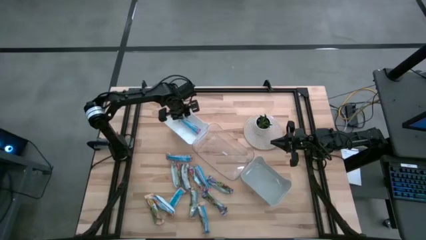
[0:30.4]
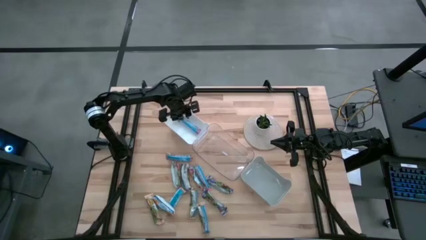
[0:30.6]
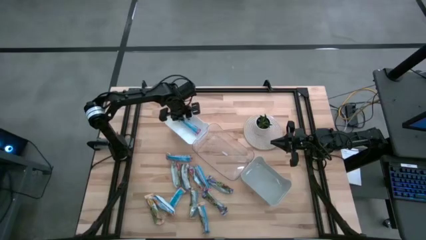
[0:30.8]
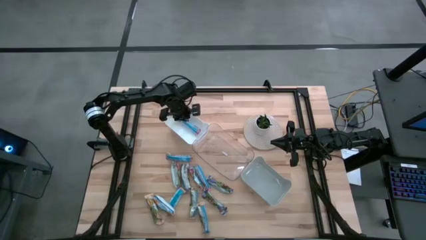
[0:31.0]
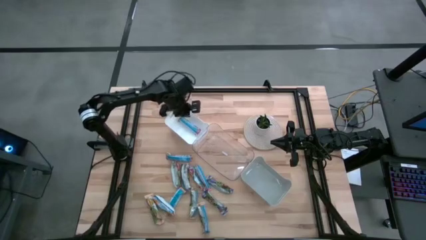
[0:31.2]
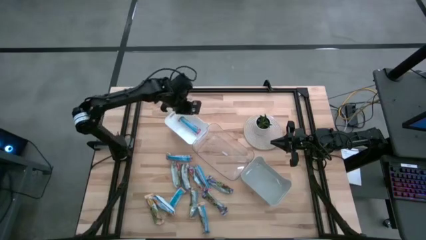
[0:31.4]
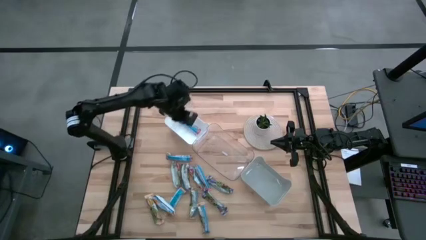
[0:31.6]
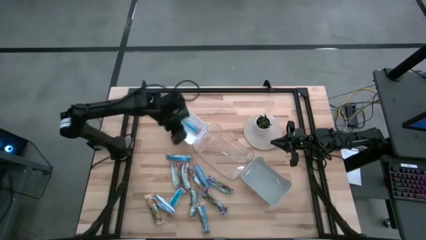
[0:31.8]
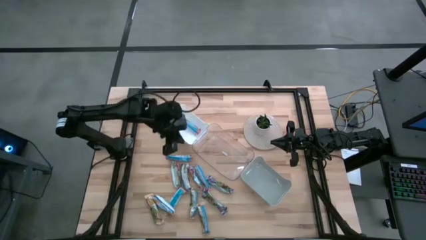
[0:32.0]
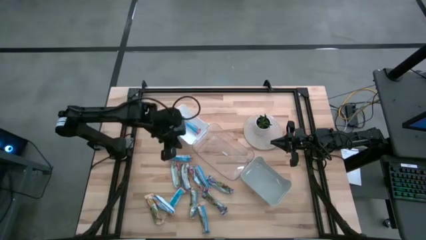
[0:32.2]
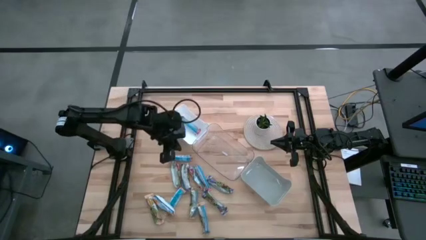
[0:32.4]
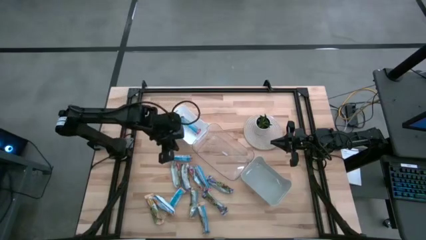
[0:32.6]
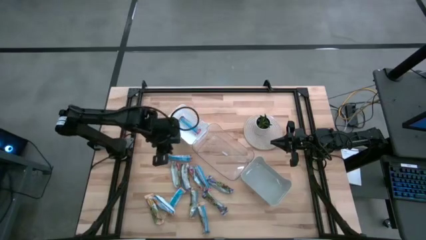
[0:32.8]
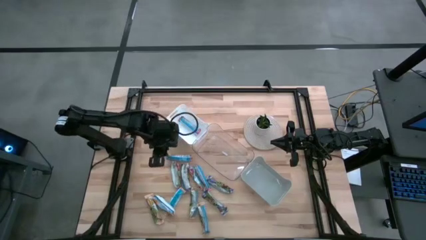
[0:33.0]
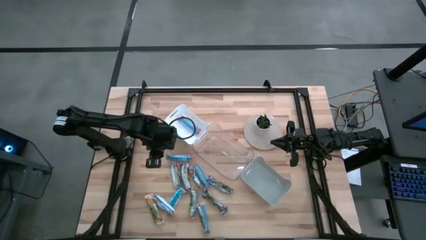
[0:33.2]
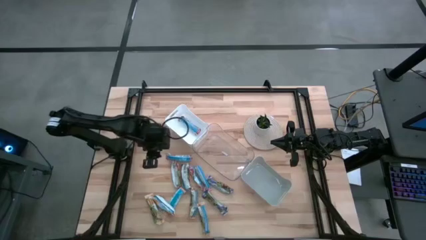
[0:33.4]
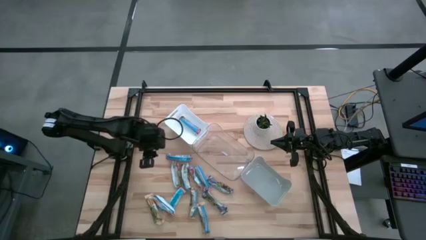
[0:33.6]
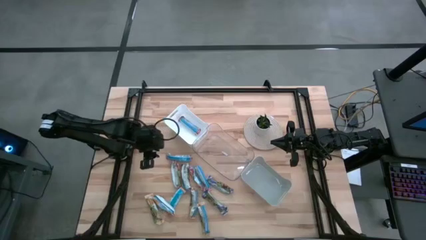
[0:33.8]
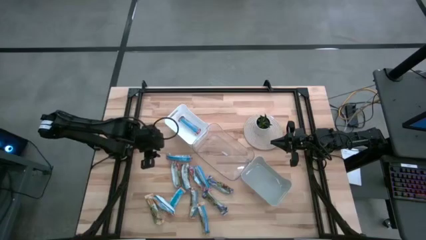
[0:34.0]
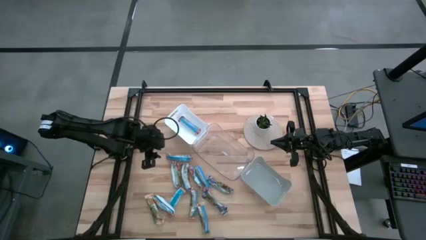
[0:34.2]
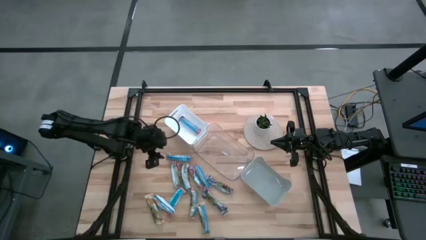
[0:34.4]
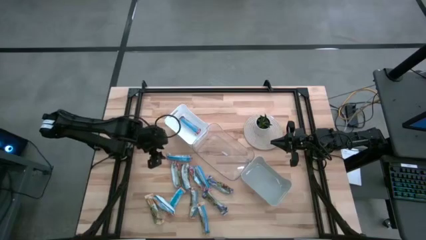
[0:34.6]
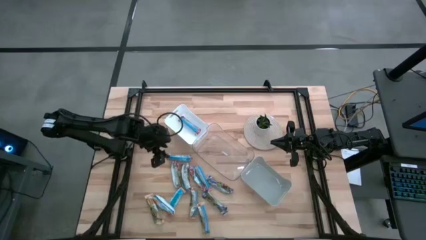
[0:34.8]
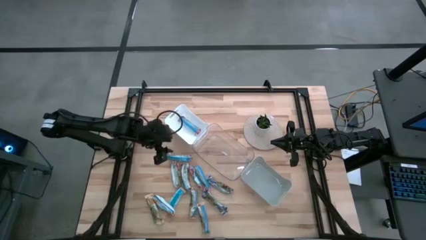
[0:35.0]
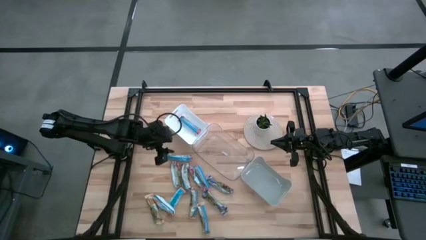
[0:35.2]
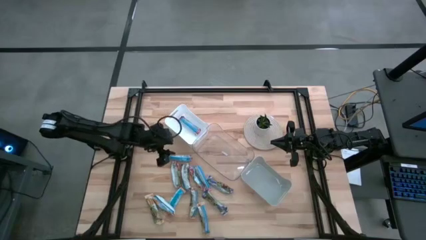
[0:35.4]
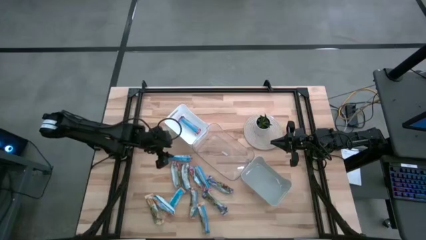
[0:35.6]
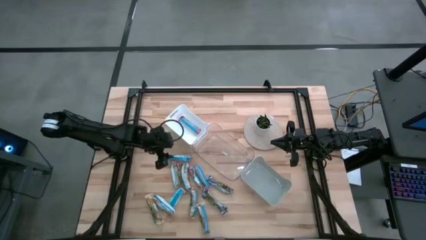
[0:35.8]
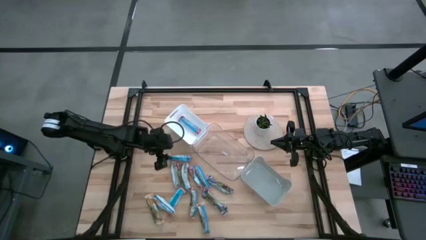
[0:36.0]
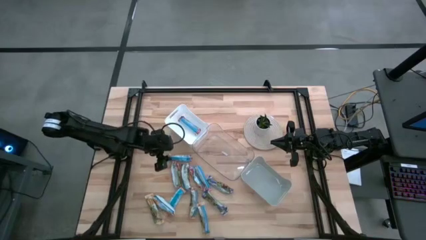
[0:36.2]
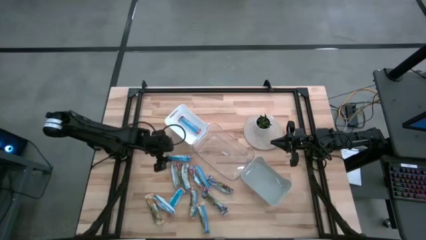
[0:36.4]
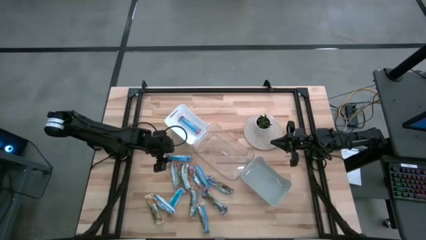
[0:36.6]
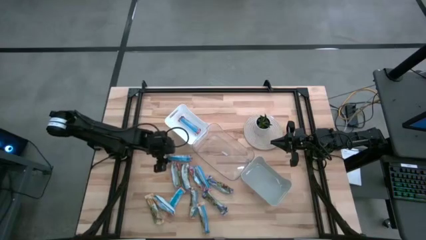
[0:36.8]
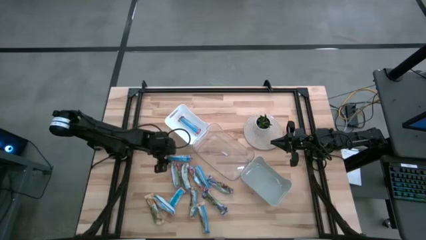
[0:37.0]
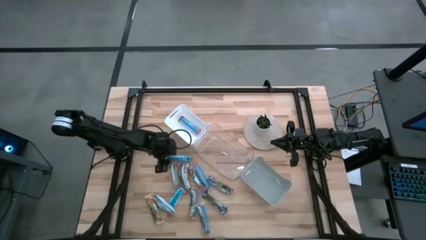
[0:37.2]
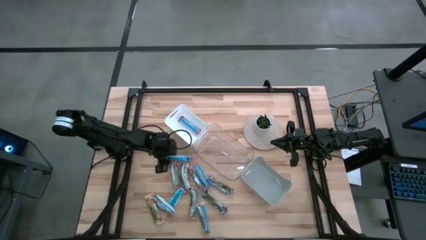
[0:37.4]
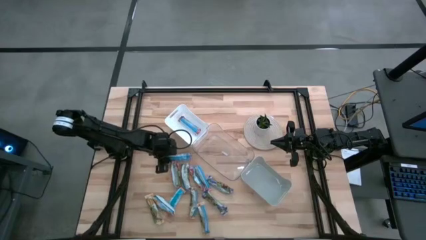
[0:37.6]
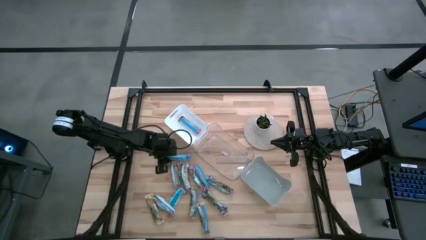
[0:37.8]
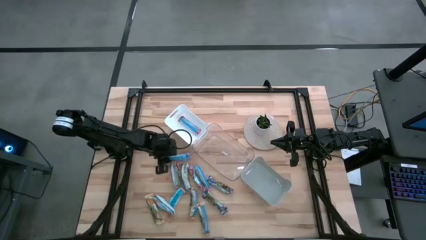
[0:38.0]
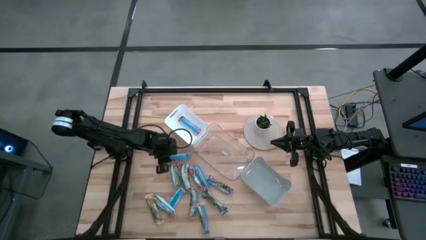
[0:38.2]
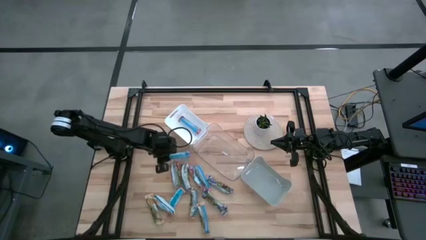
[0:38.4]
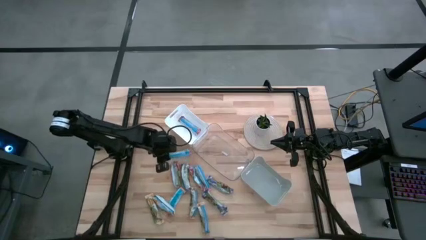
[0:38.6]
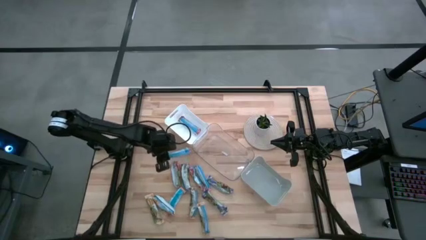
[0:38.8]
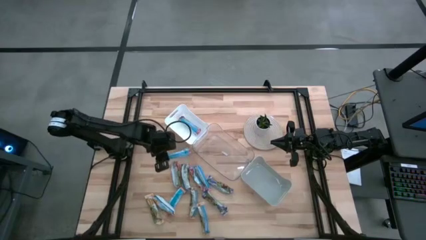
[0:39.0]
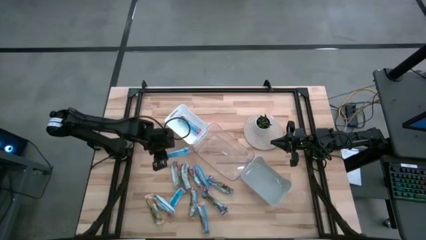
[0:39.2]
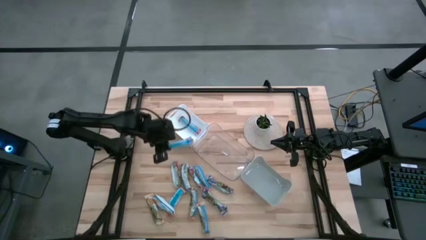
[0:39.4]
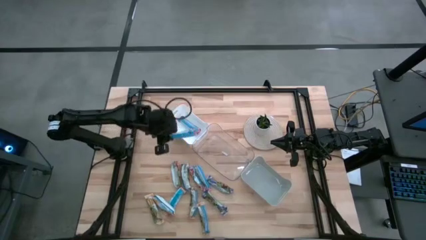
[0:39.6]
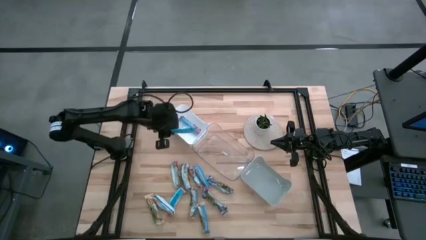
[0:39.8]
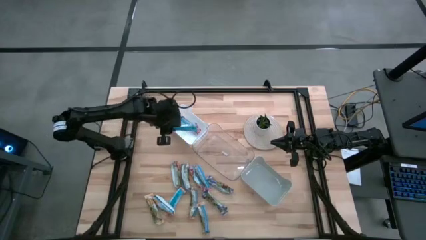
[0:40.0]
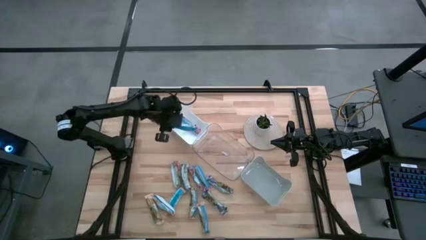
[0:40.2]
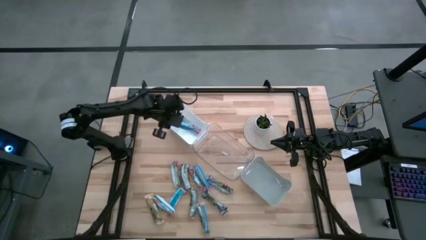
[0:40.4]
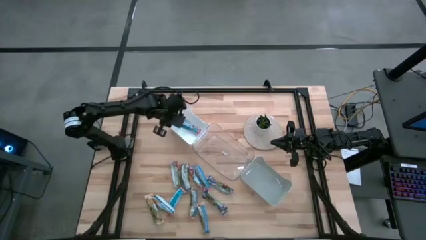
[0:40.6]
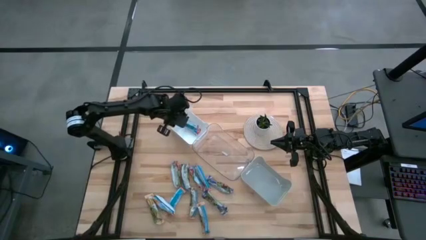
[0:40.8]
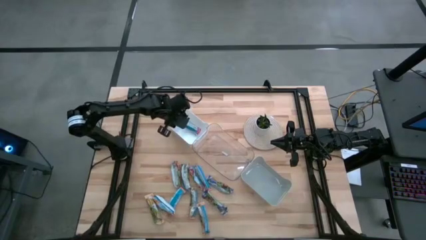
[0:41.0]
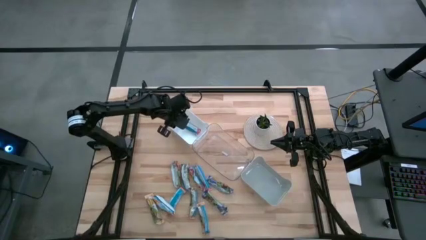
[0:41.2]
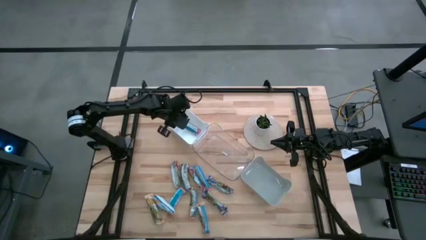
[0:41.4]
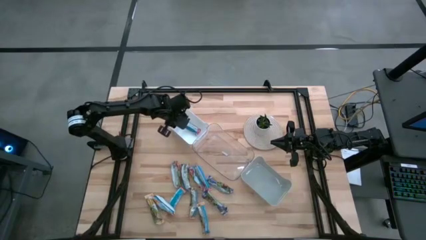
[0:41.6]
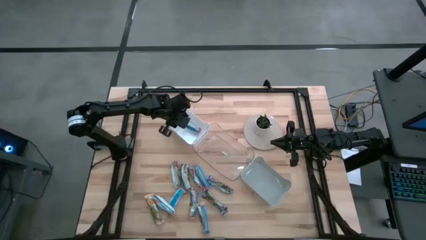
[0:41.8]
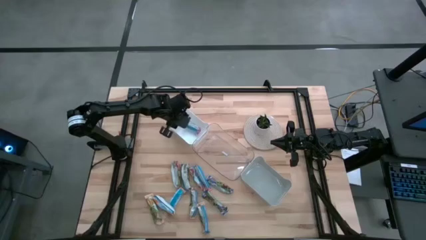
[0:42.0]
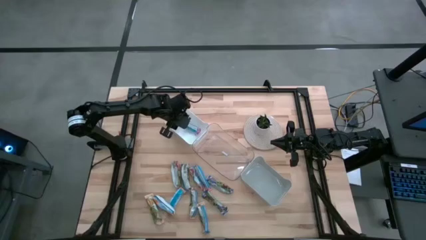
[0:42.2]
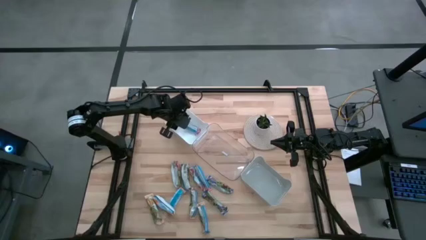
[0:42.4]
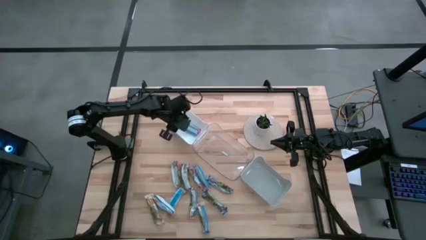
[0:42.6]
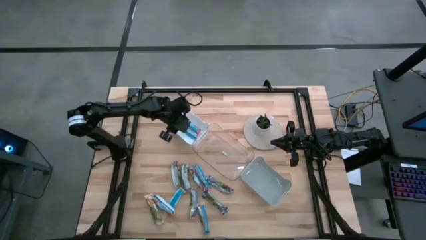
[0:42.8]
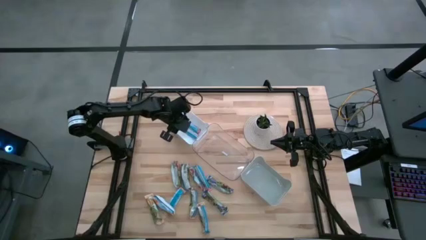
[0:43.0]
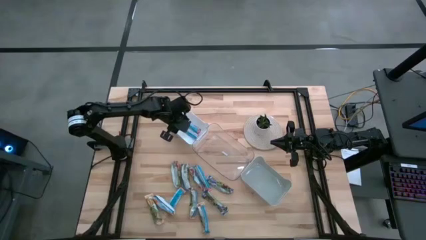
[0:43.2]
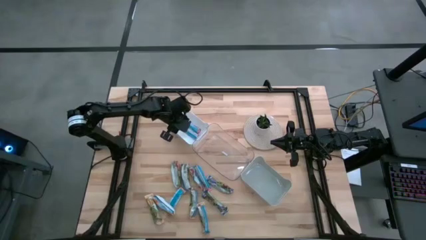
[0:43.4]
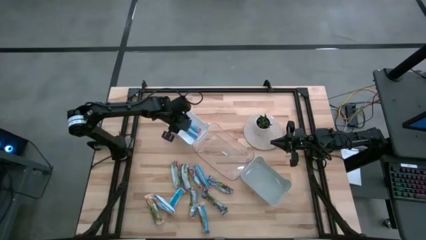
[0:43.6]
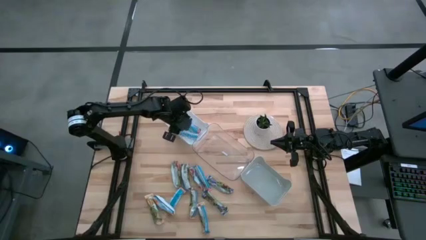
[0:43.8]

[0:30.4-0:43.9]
Task: Pick and place Granola Bars by type
Put the red granola bar into the white bin
